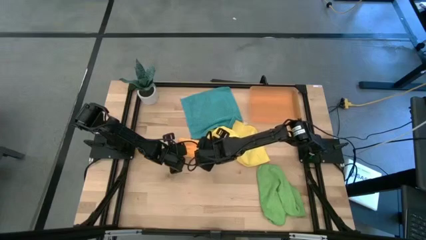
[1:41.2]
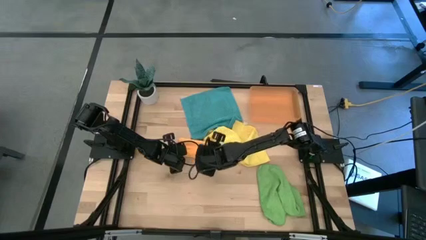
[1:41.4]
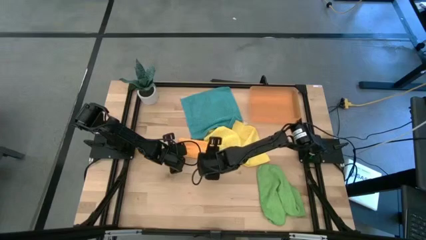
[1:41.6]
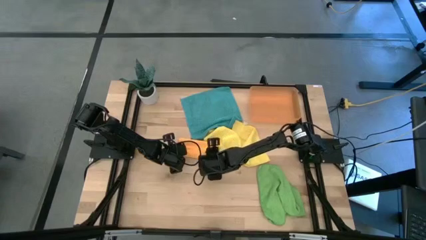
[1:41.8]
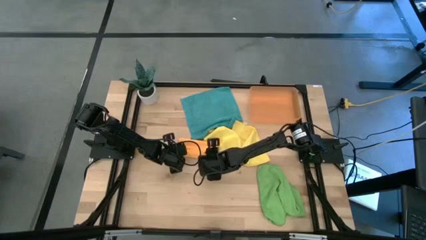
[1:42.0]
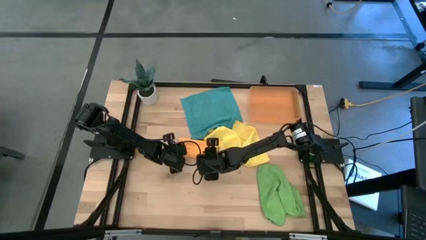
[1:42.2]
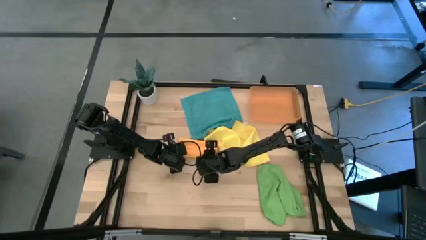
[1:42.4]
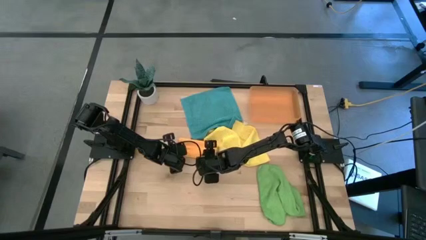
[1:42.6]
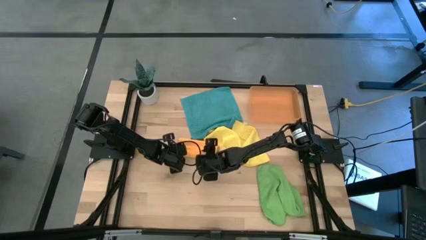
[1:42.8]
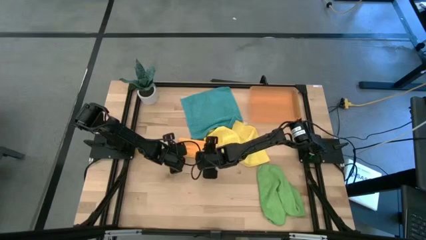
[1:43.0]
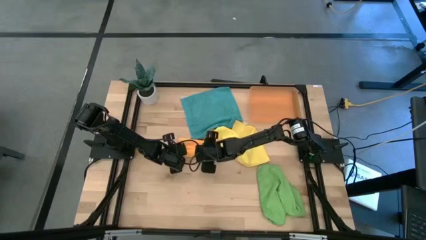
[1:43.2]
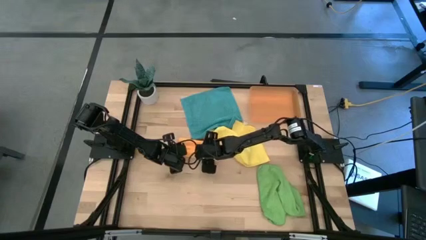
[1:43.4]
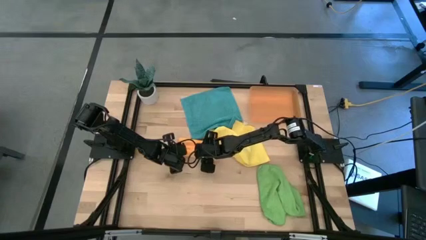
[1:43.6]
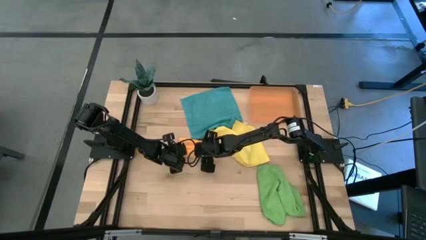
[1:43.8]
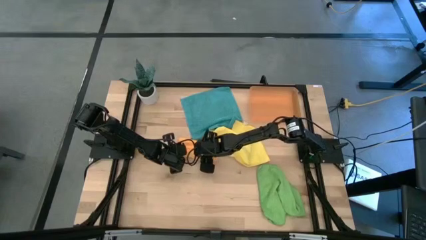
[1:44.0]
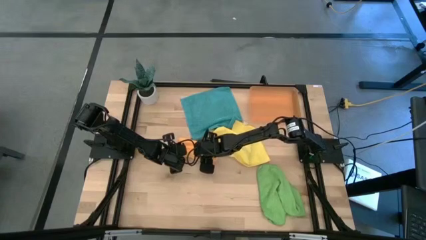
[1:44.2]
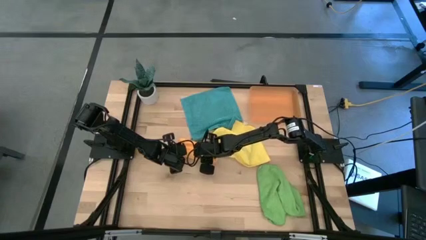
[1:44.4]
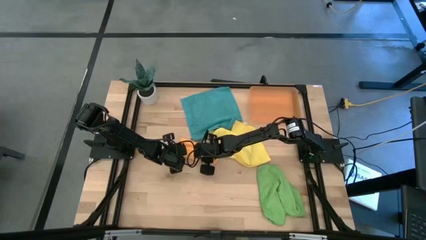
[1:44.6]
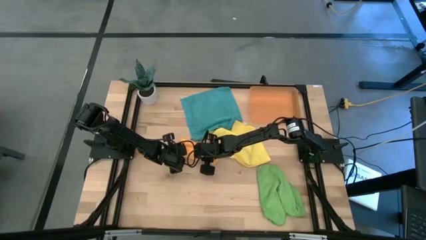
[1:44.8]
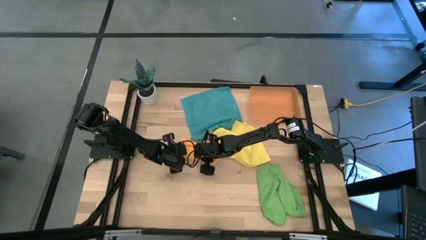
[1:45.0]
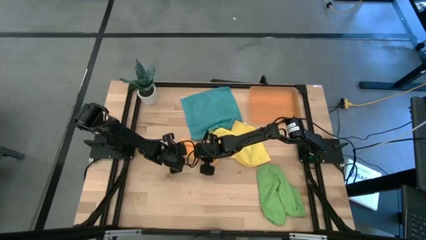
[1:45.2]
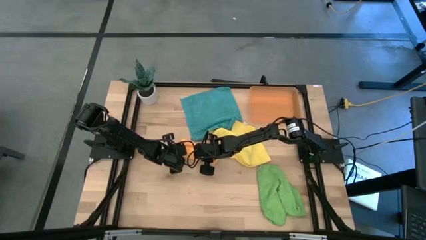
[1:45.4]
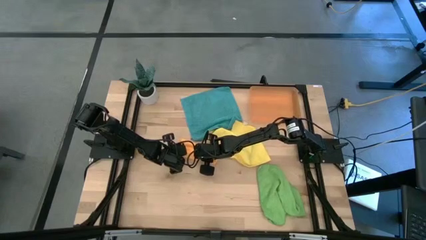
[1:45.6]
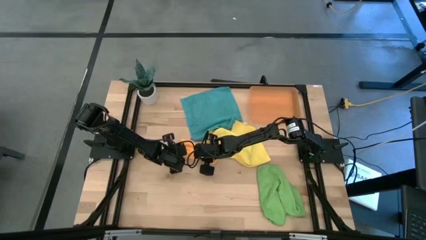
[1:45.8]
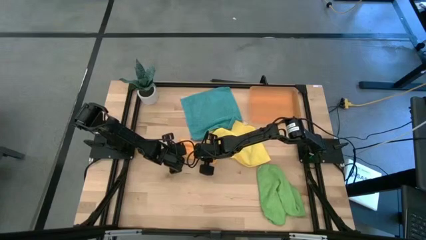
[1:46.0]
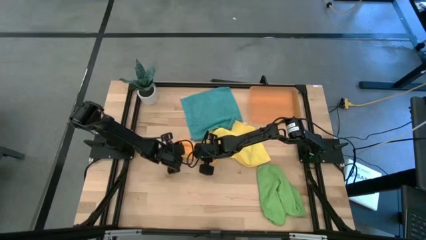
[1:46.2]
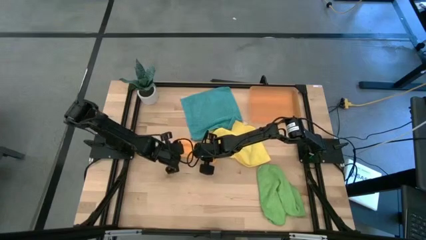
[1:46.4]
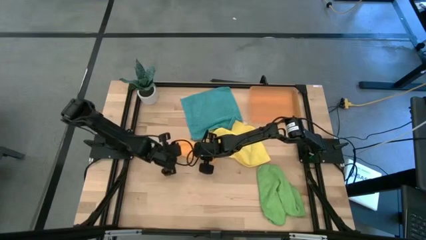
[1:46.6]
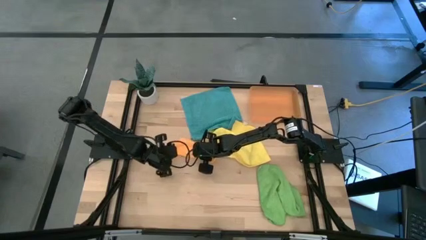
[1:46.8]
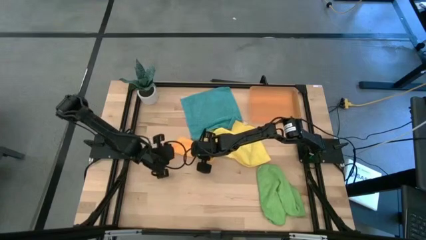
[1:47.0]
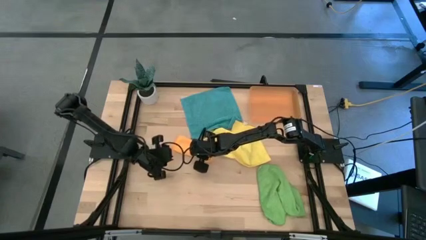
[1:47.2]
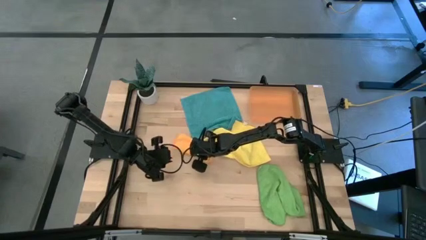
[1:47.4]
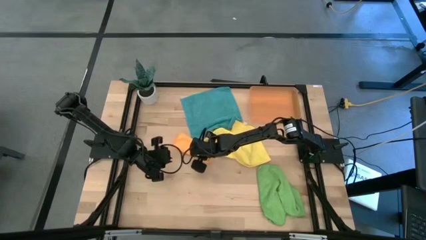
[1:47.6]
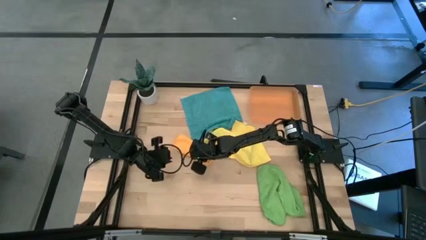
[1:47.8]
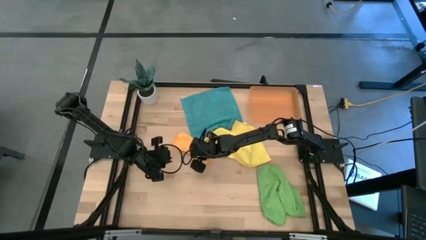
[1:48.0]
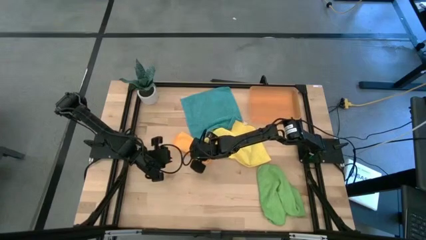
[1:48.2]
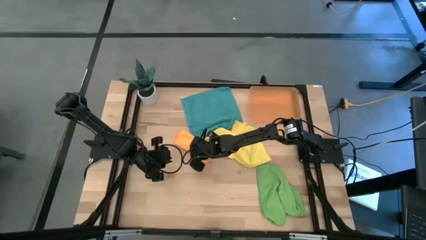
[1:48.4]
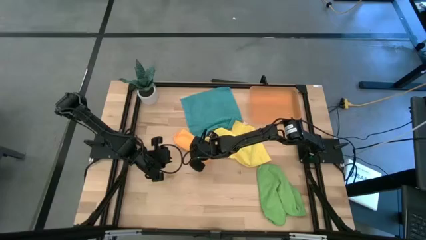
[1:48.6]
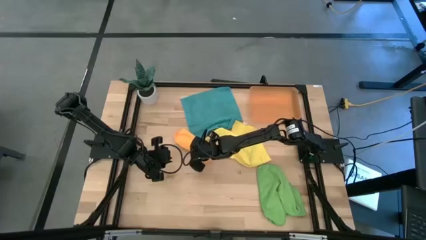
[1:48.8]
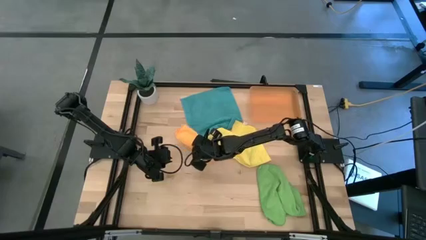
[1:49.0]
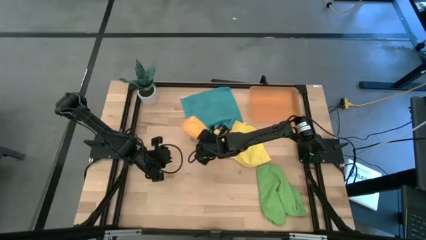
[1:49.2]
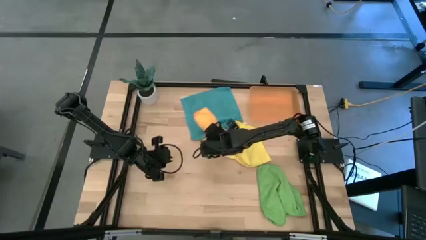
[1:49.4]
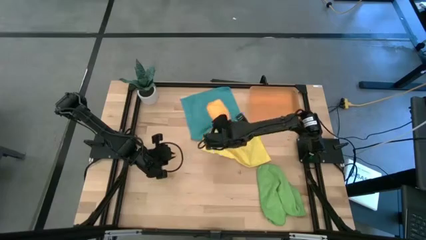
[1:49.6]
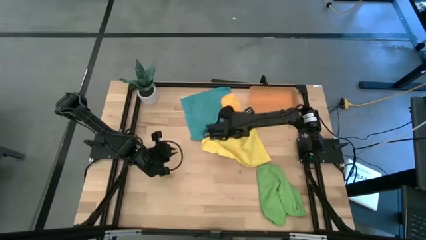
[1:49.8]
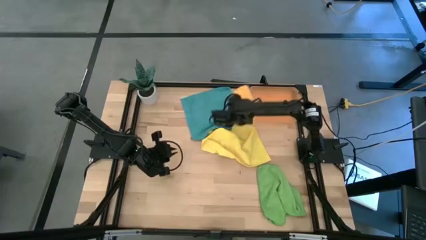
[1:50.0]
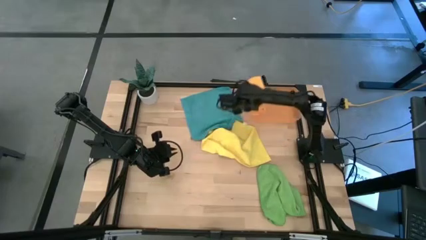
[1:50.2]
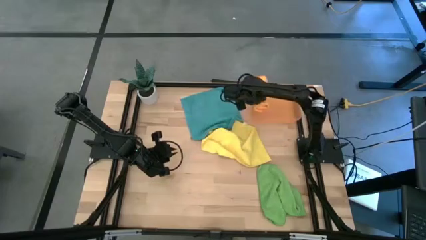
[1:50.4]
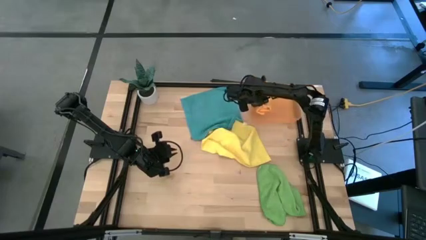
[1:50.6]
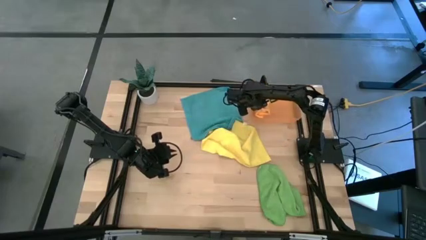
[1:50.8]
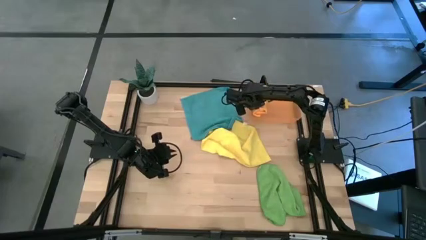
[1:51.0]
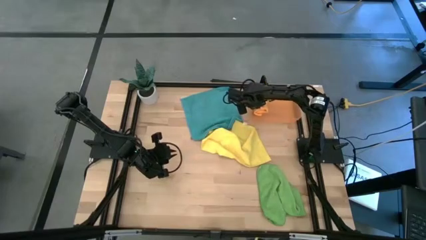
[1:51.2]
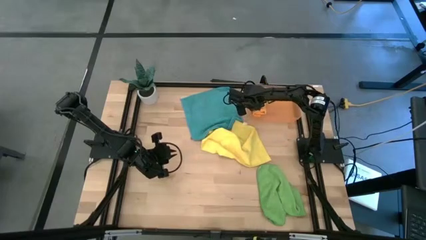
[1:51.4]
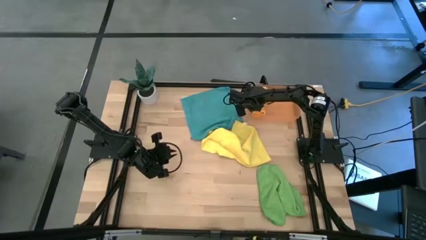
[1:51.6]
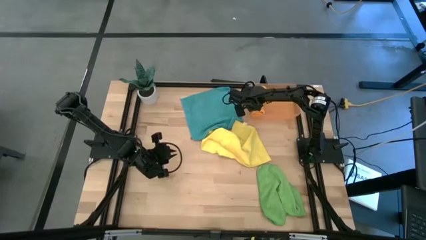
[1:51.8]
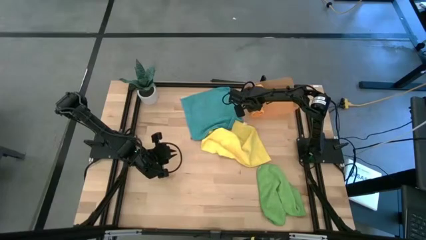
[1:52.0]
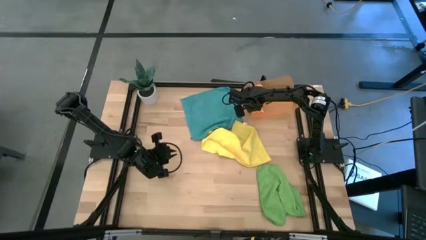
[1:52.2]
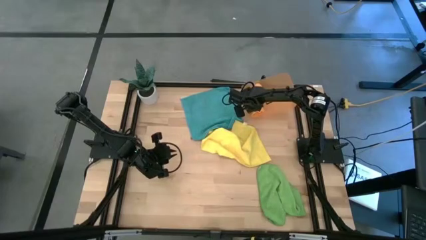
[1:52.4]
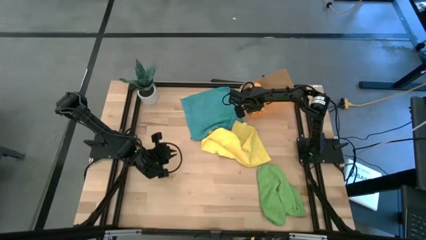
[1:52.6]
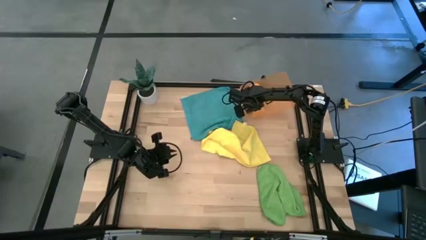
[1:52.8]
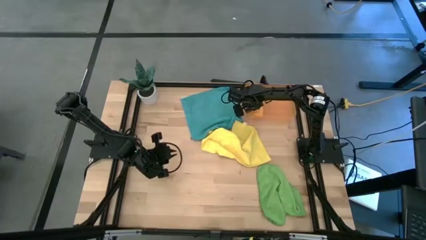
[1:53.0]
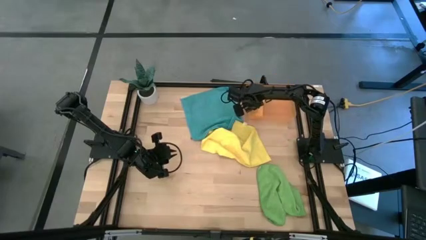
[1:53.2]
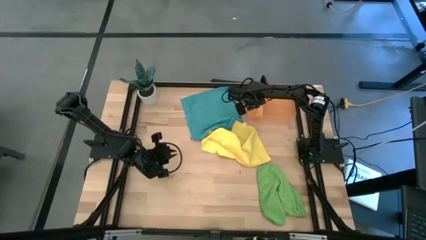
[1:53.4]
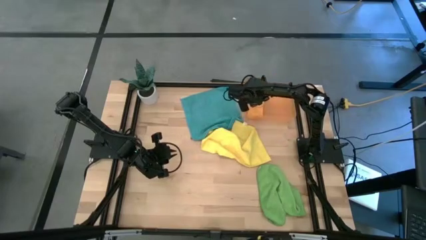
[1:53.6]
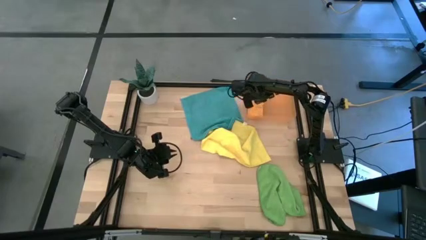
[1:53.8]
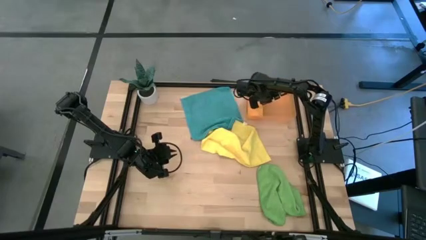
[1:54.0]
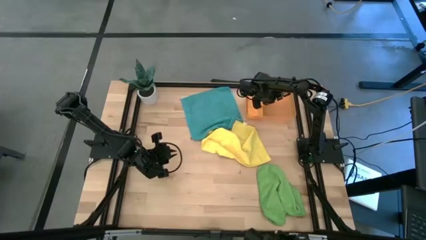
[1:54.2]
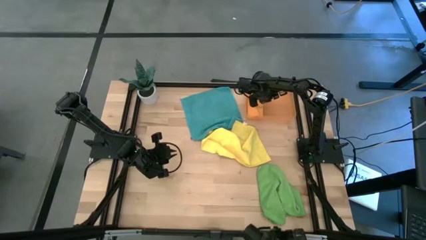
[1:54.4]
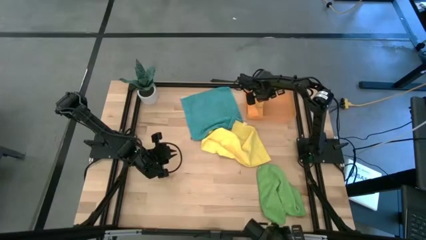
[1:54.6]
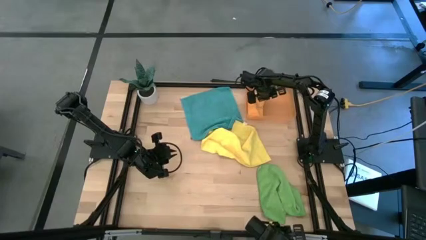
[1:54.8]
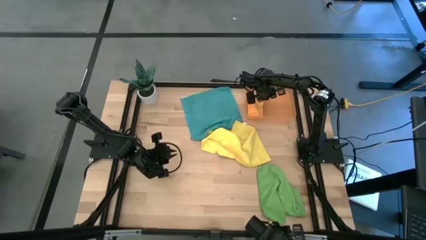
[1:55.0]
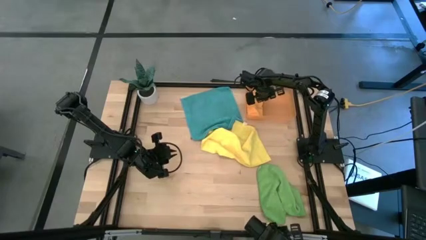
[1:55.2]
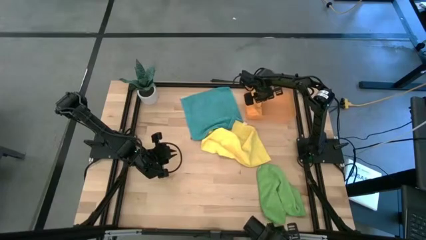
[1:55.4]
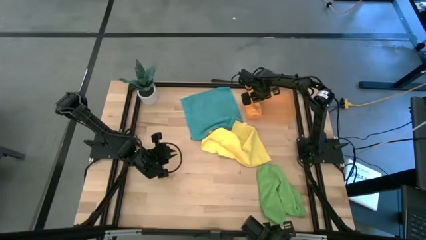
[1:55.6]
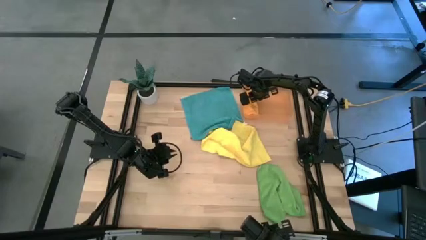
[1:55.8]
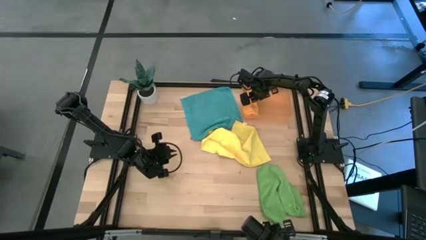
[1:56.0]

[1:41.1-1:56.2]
Task: Roll microfiber towels into tight, uniform cylinder then place into a basket
Put the orange microfiber towel into the bin

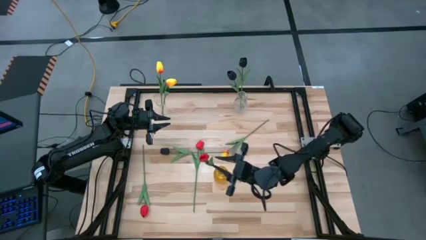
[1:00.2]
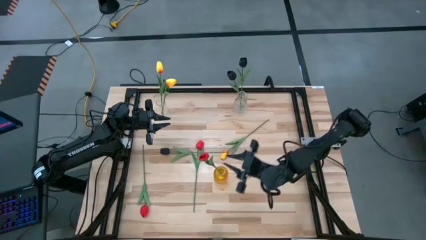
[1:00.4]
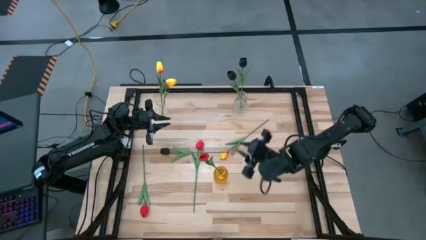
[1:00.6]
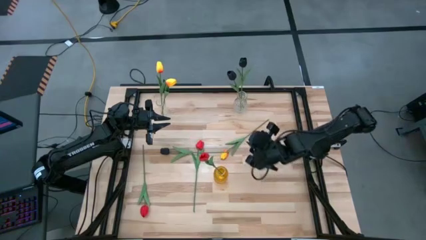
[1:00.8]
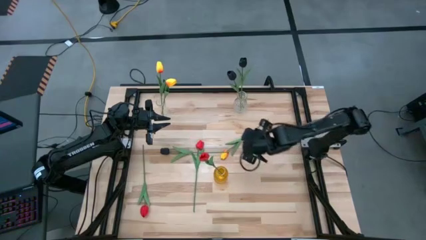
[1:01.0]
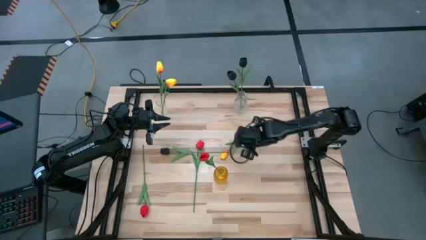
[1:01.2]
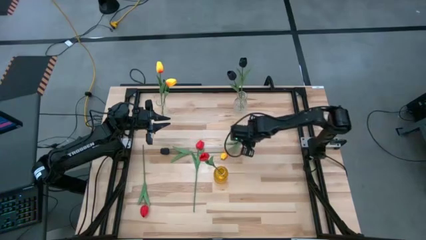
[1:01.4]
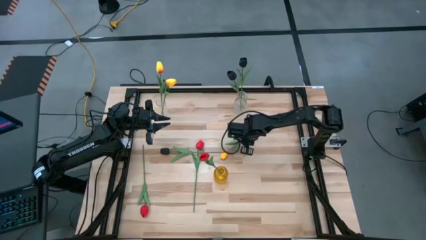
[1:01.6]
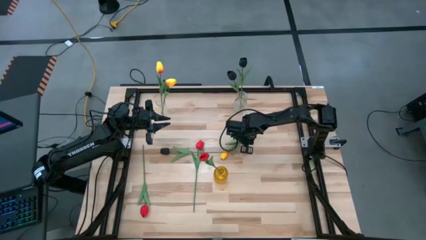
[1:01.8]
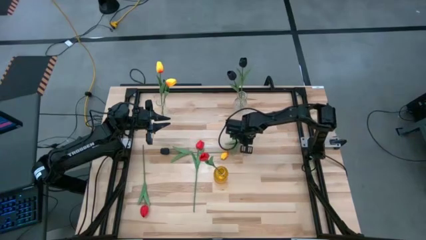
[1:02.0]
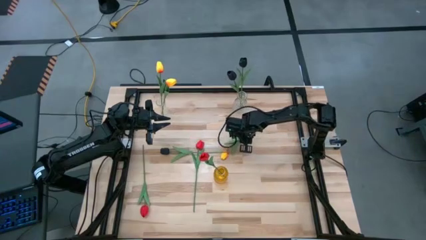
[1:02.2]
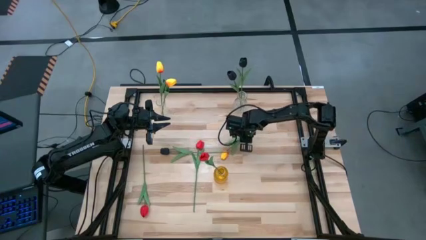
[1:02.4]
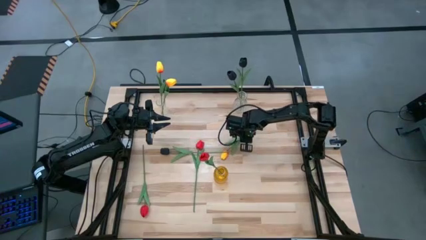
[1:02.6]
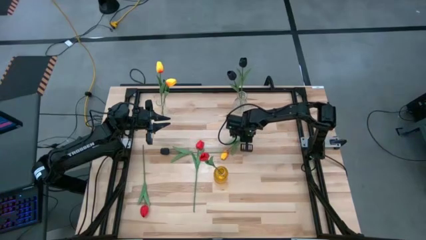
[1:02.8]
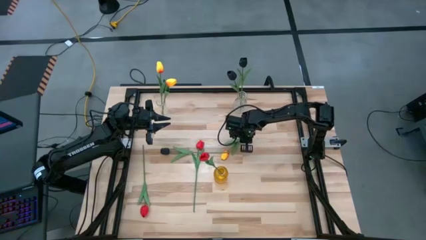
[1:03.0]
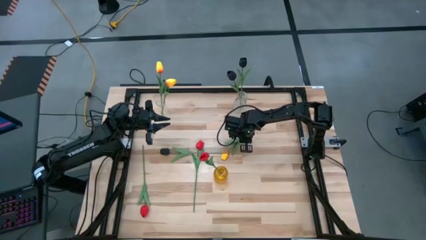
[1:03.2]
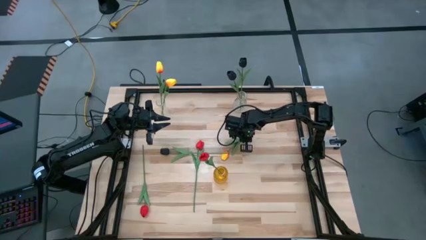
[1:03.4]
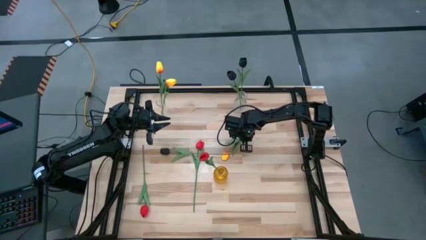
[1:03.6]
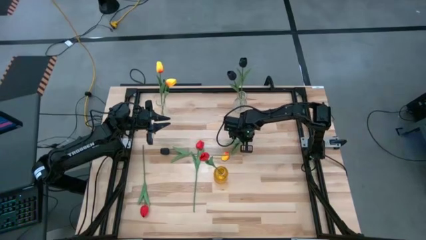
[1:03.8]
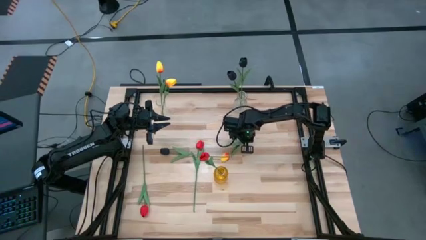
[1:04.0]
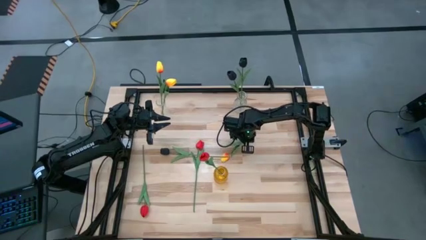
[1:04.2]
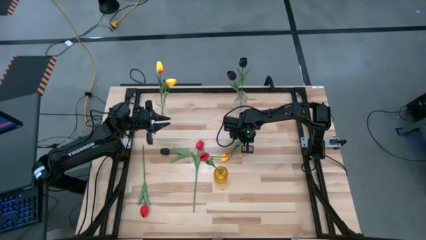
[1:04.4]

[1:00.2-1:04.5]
Task: Sort flowers into vase by color
Put the yellow flower into the left transparent vase
